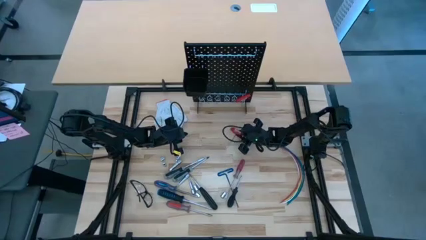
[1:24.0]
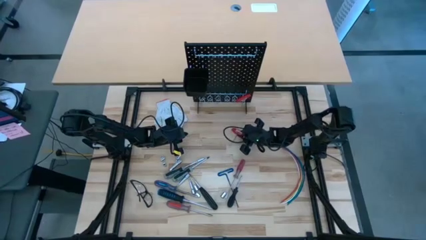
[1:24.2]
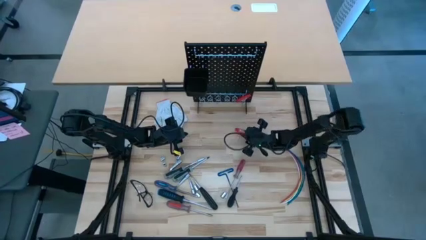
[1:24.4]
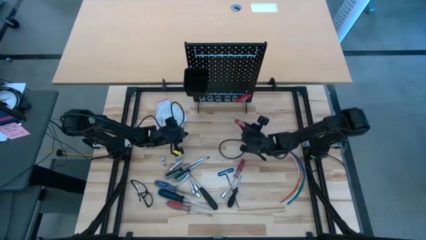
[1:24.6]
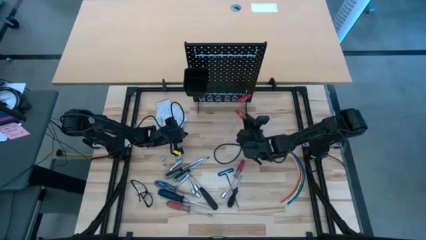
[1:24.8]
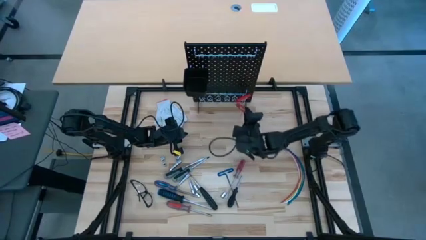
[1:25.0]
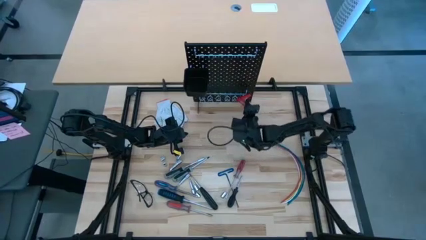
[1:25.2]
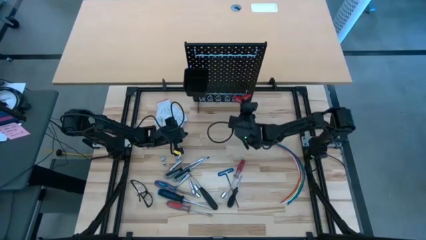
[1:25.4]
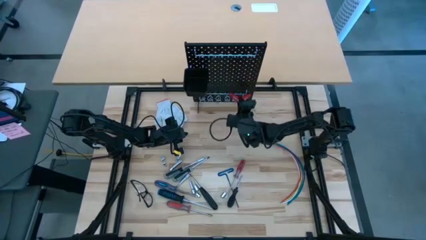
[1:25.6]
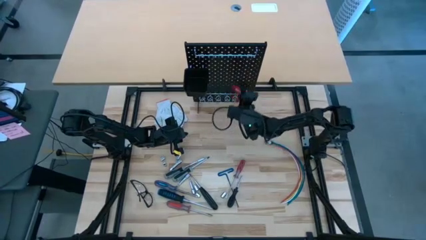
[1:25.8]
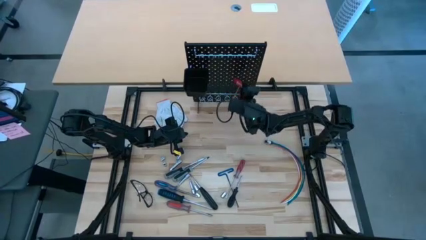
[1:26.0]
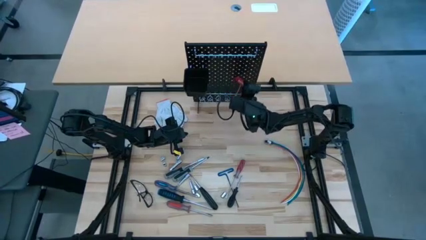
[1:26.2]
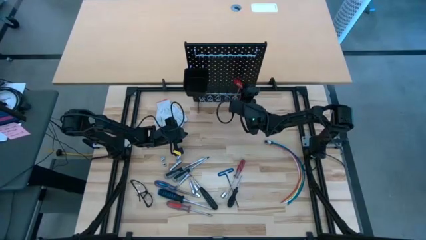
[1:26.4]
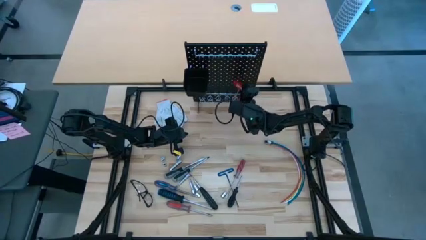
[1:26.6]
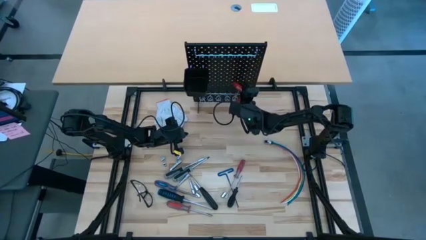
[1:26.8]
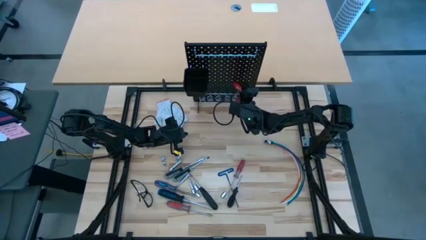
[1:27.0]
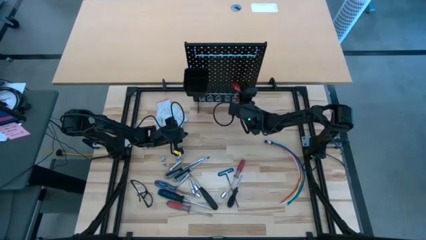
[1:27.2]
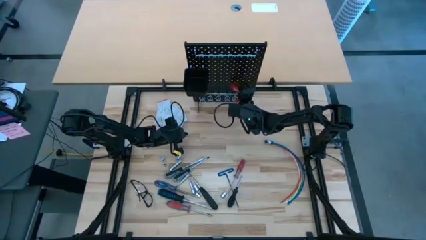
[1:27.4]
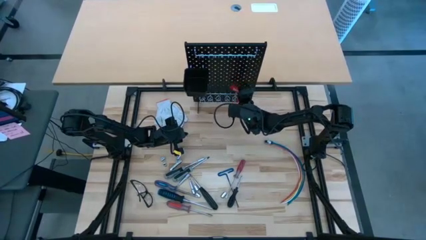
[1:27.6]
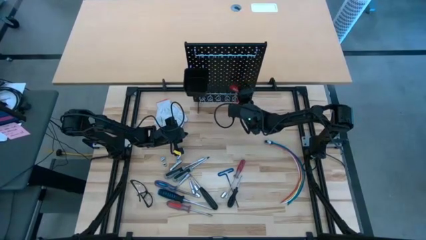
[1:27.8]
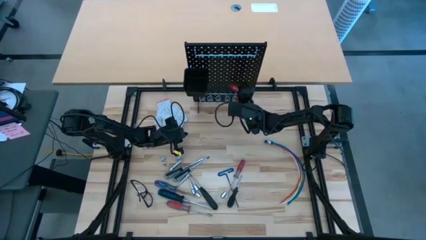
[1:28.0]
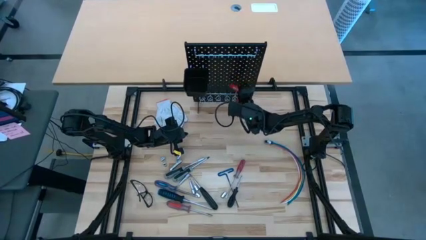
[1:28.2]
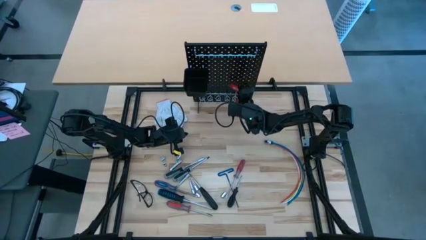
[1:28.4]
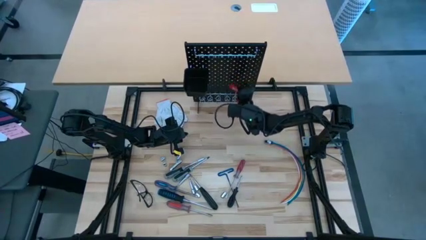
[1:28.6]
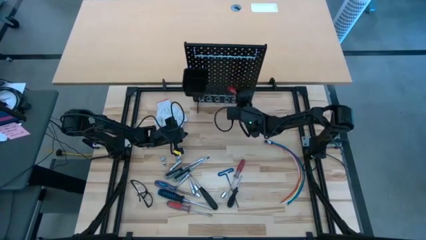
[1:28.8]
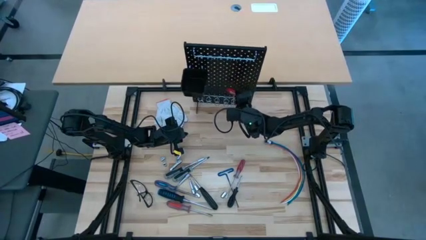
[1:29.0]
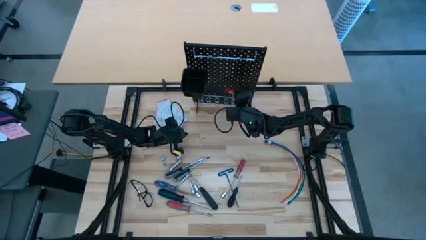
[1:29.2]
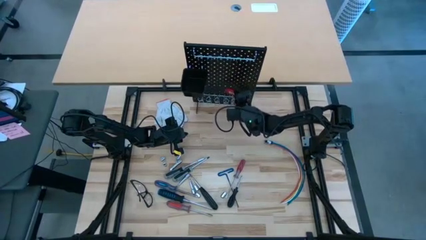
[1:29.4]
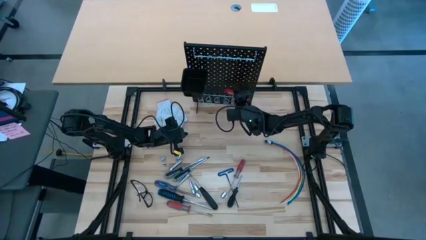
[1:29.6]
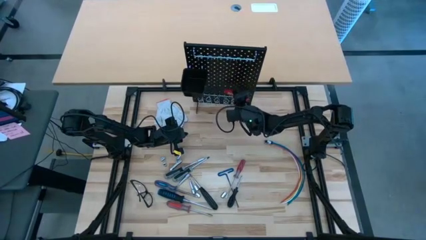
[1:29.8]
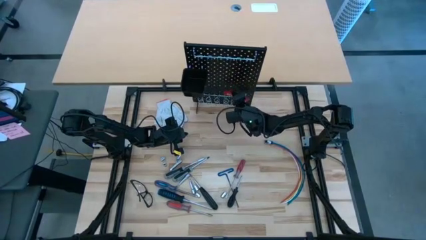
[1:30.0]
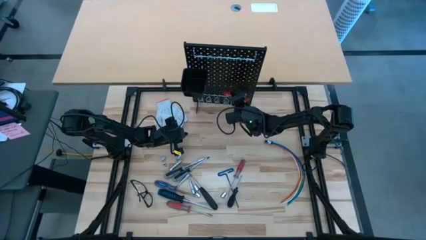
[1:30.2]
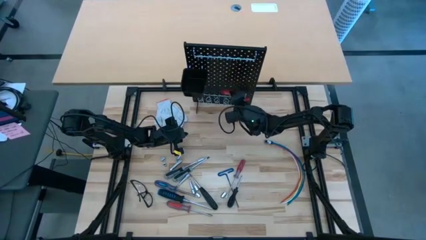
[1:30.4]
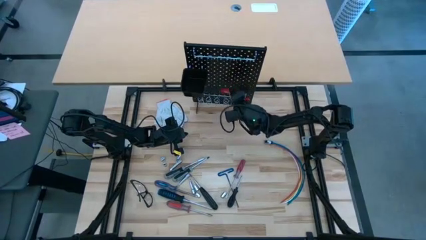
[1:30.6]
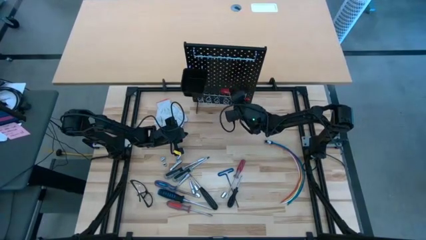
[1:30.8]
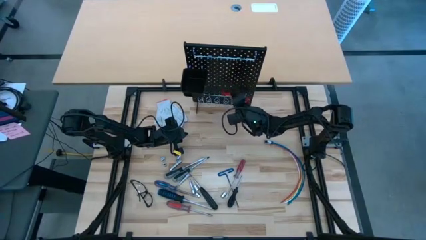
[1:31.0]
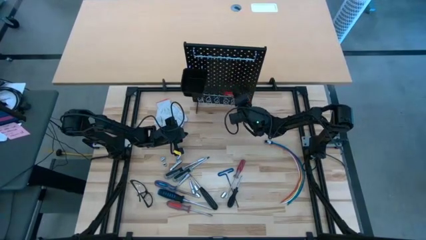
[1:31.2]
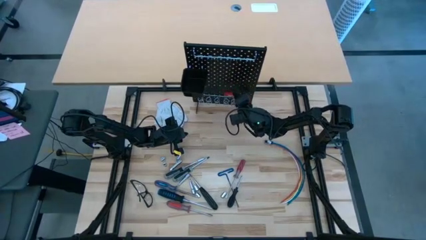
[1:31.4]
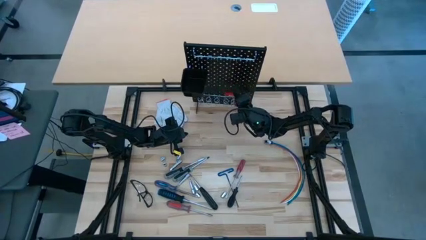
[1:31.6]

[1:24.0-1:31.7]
Task: Hang tools onto peg board
Hang the red allen wrench on the pegboard

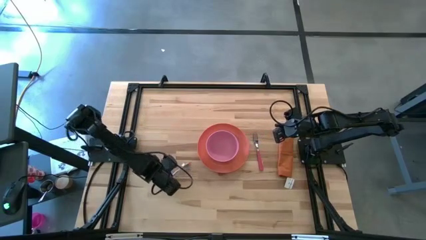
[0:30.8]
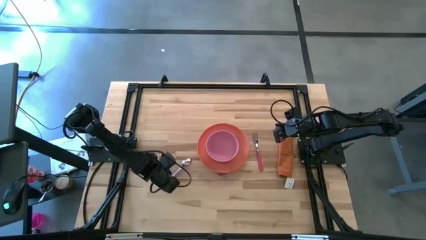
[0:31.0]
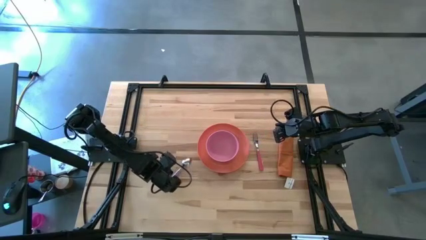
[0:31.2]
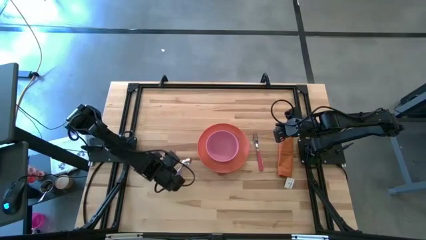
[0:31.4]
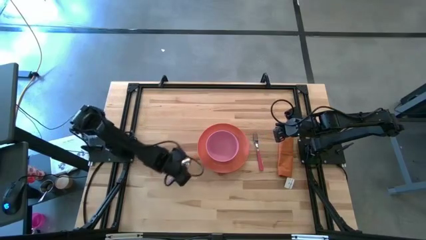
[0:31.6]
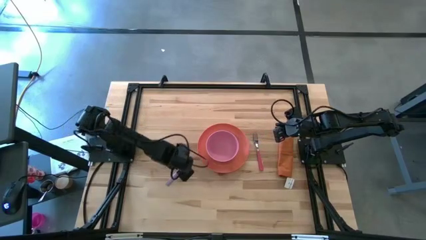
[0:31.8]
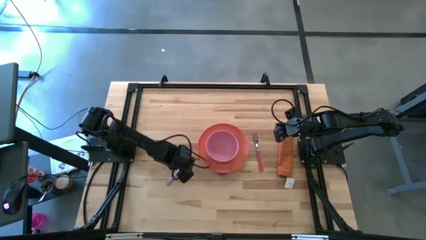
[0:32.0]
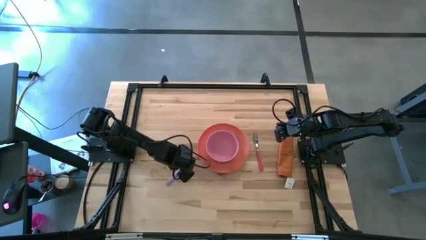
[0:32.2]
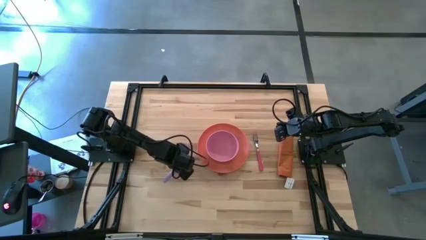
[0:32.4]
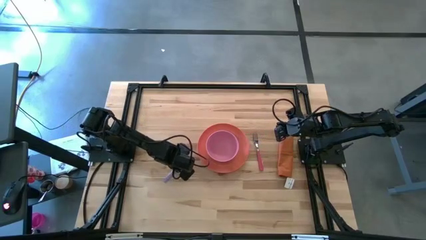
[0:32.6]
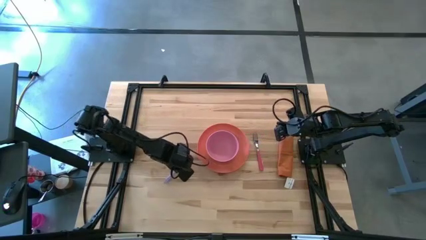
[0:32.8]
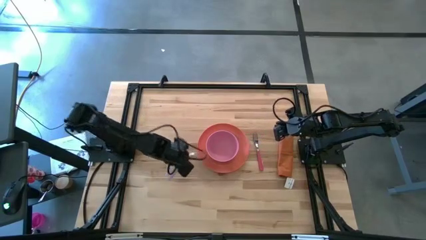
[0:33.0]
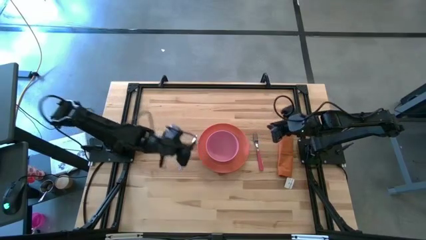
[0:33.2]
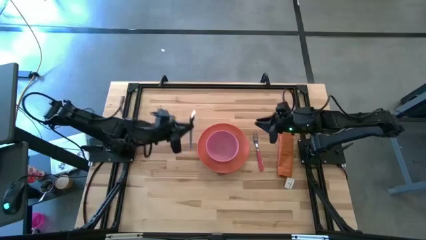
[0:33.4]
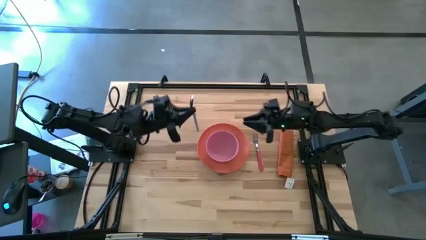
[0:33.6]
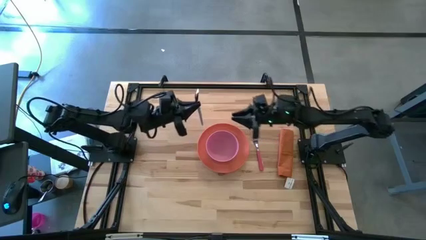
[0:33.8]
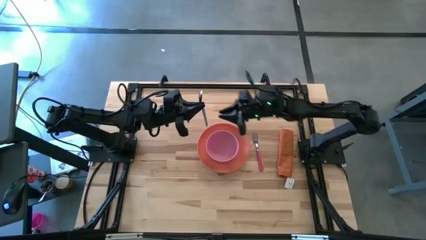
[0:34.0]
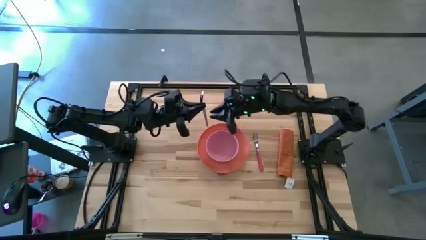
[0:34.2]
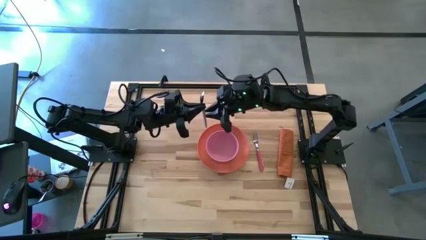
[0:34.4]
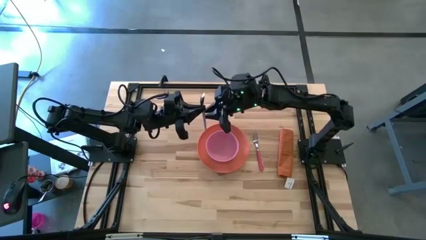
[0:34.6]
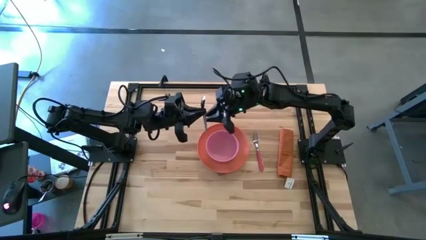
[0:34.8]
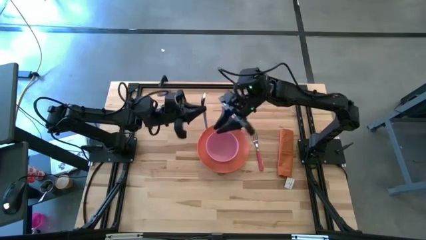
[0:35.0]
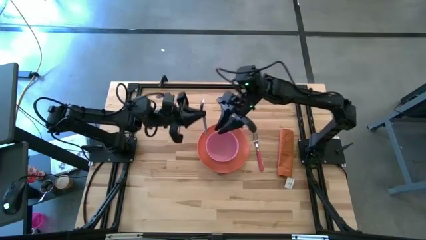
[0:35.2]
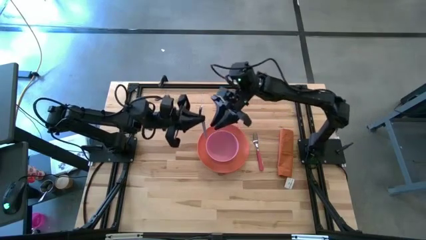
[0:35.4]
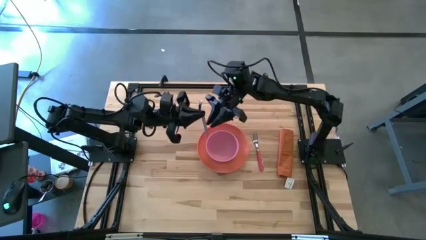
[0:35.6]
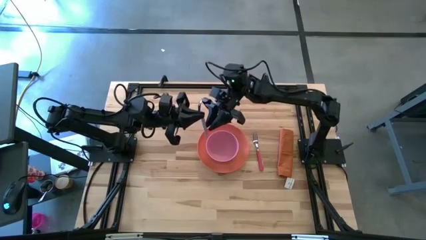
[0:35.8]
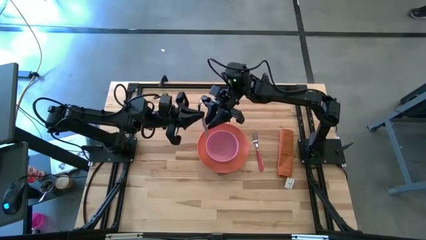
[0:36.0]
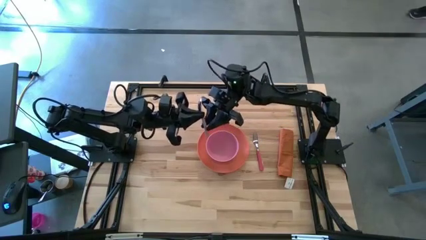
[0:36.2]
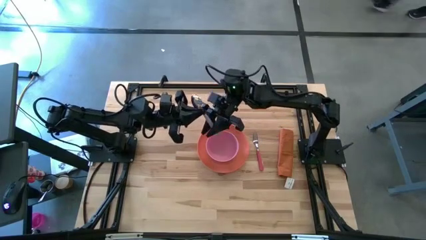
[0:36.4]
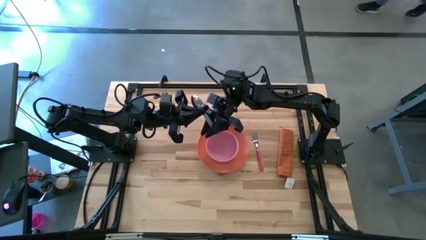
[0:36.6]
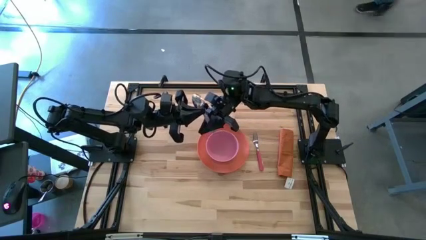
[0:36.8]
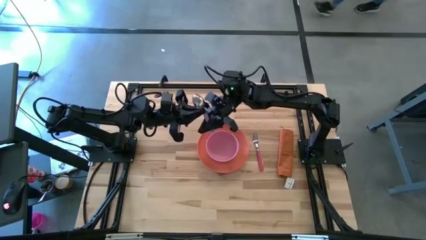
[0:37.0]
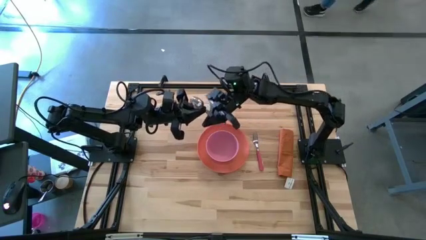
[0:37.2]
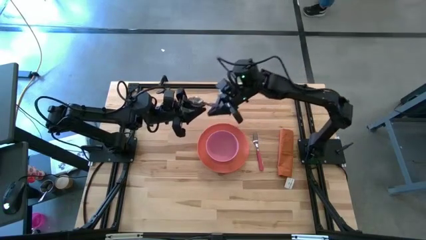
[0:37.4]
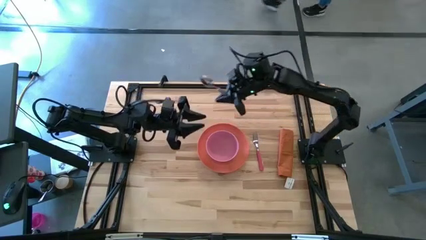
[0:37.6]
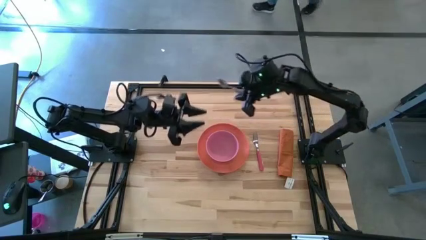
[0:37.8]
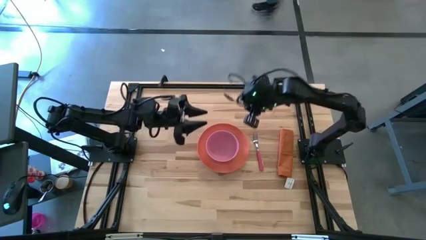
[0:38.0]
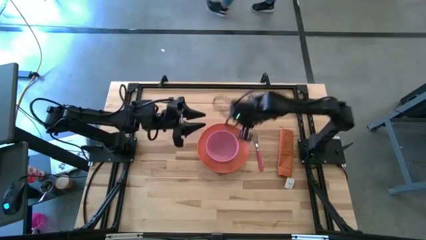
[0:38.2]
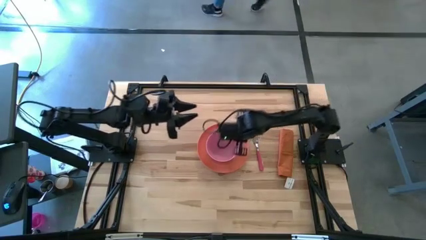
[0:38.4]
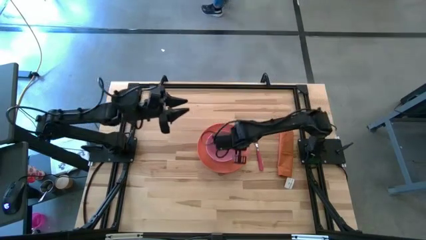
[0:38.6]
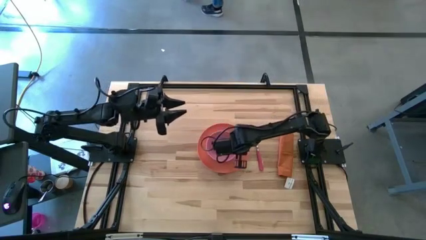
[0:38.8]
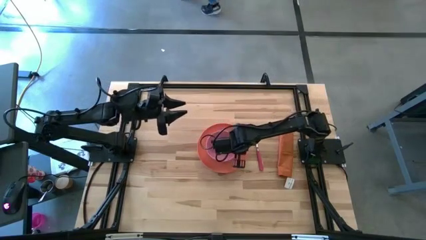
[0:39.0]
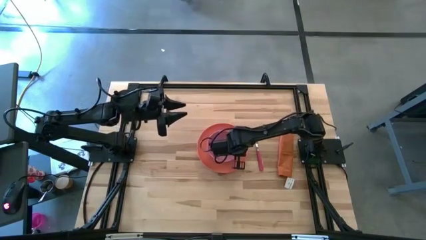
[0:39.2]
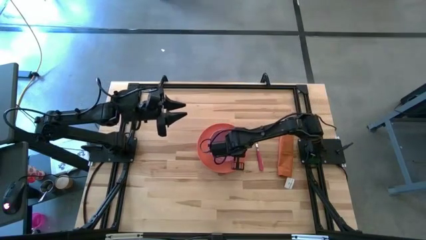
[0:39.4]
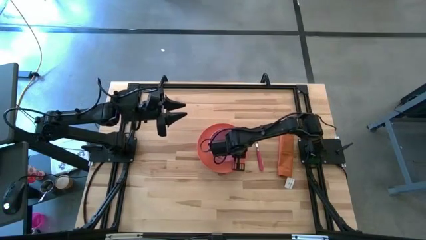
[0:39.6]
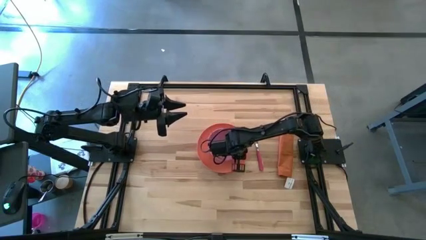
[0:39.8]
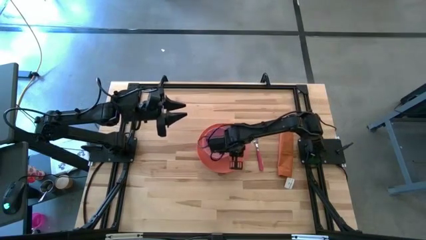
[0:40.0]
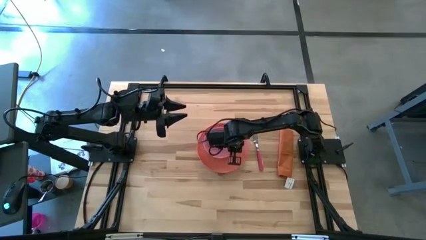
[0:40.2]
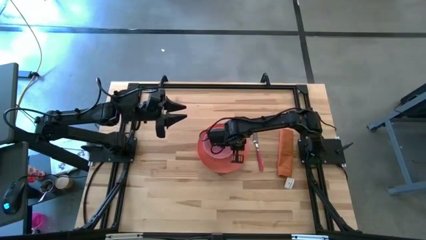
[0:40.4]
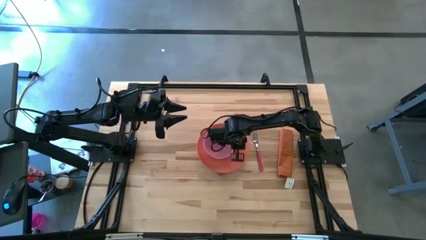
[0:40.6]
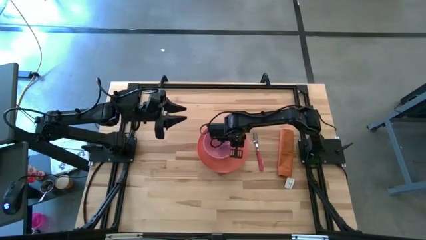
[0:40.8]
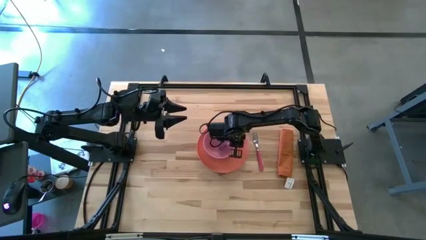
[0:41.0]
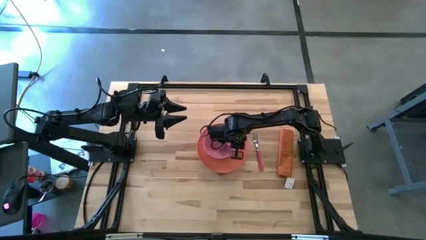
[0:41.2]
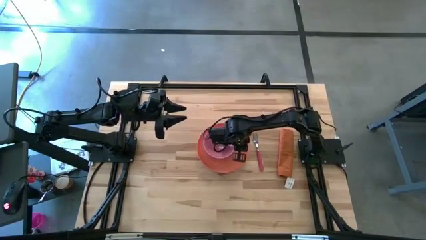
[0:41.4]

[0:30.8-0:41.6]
Task: Set table place
Put the spoon into the bowl on the plate
